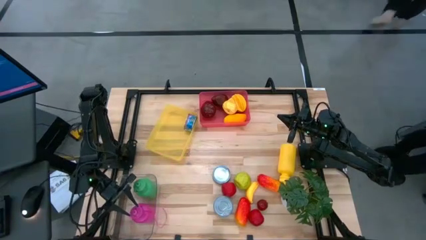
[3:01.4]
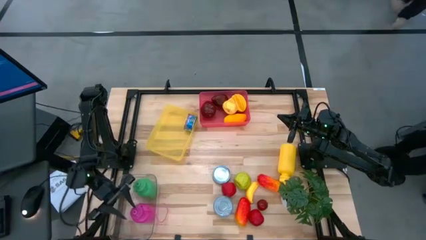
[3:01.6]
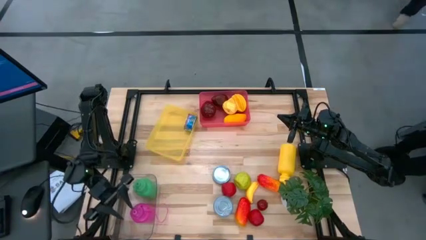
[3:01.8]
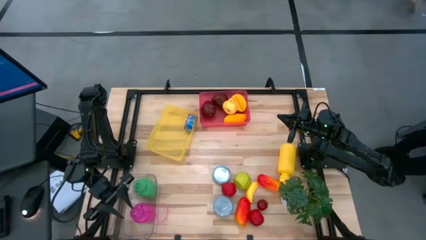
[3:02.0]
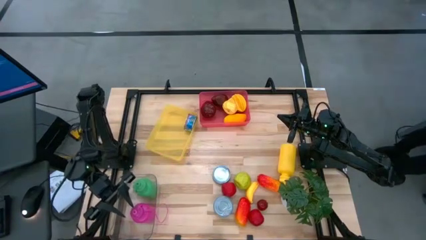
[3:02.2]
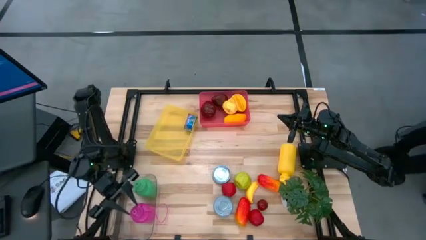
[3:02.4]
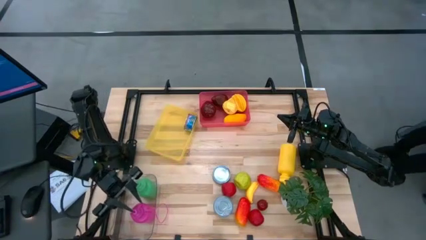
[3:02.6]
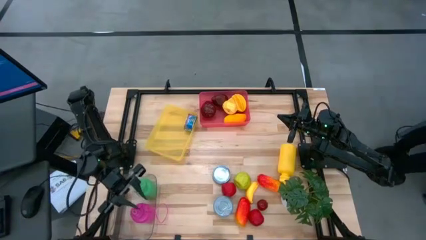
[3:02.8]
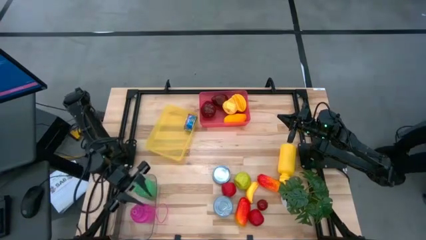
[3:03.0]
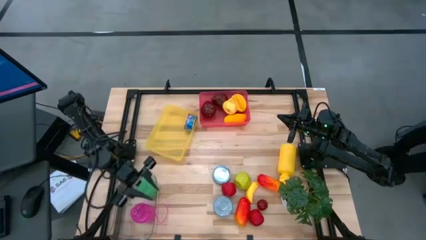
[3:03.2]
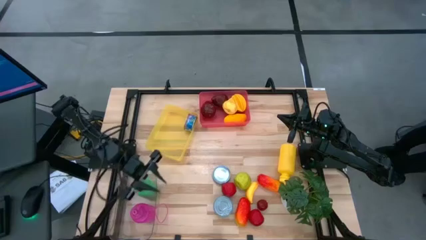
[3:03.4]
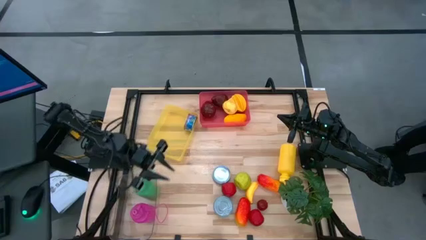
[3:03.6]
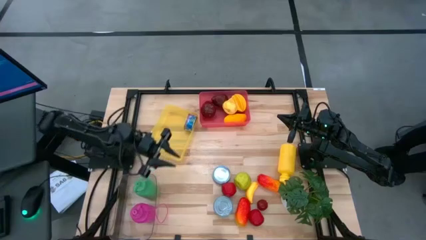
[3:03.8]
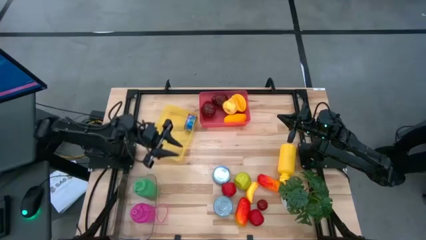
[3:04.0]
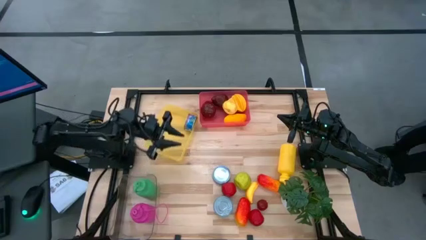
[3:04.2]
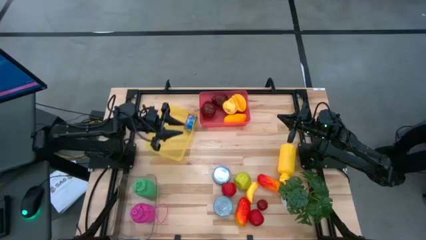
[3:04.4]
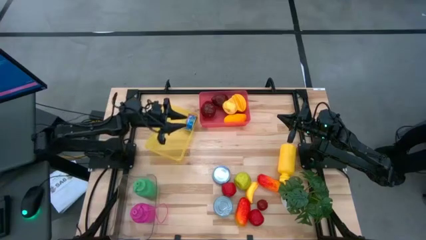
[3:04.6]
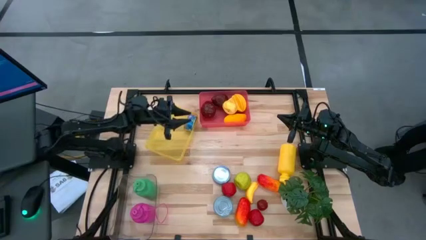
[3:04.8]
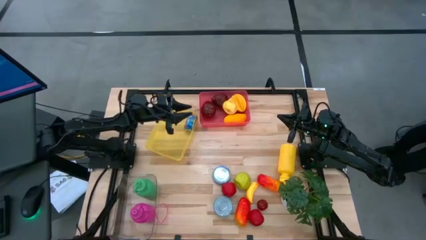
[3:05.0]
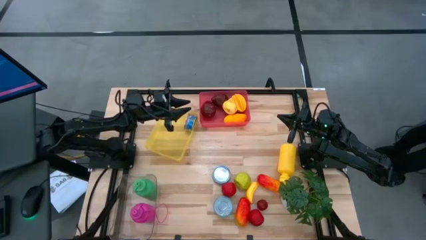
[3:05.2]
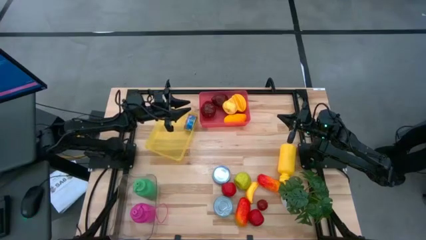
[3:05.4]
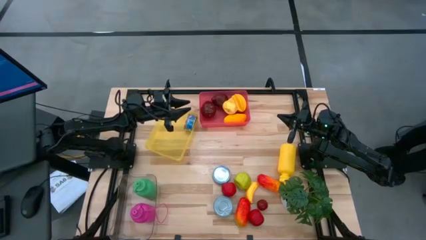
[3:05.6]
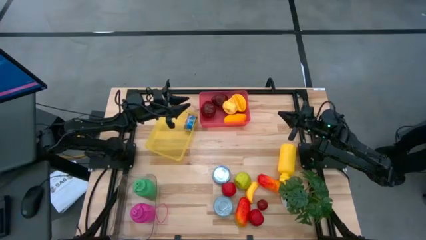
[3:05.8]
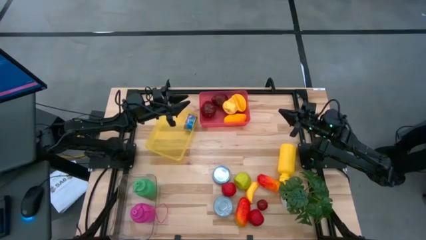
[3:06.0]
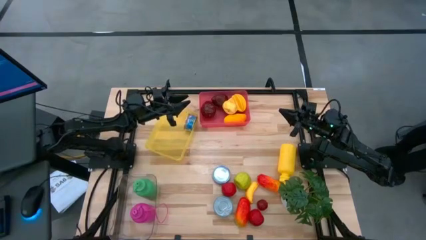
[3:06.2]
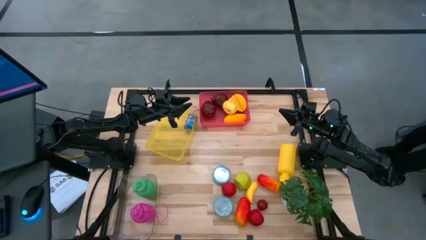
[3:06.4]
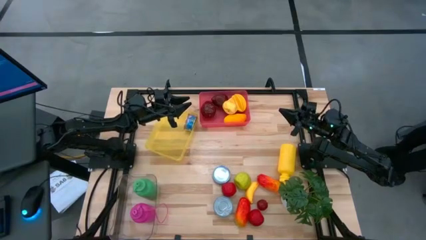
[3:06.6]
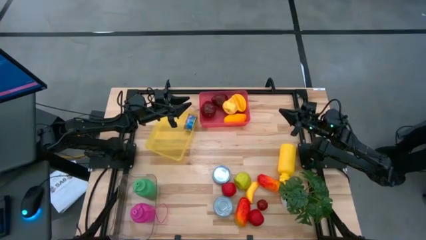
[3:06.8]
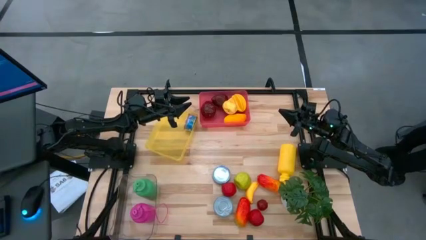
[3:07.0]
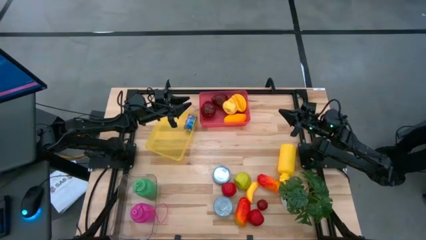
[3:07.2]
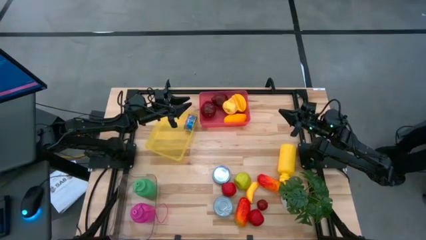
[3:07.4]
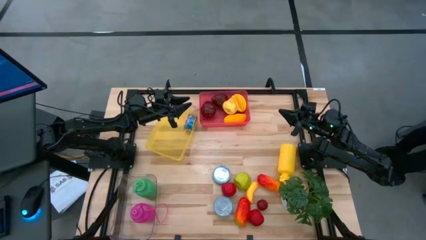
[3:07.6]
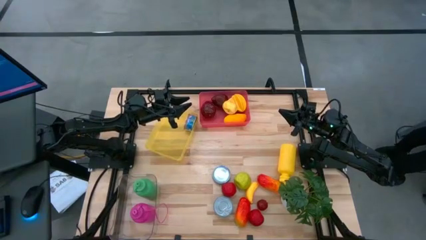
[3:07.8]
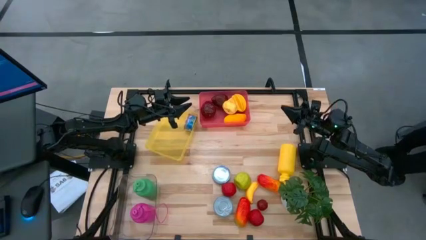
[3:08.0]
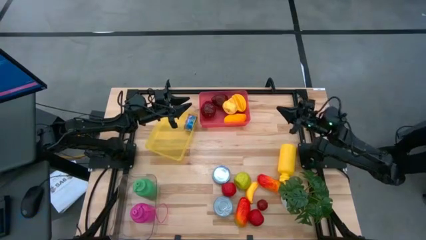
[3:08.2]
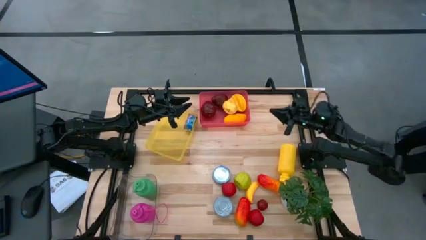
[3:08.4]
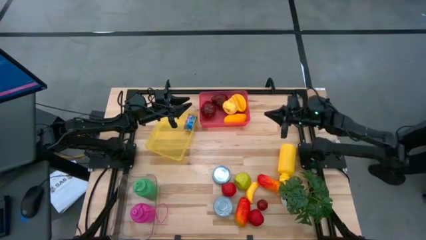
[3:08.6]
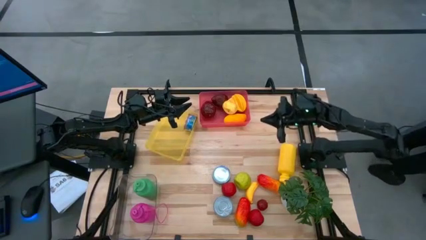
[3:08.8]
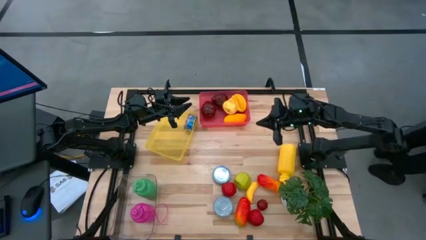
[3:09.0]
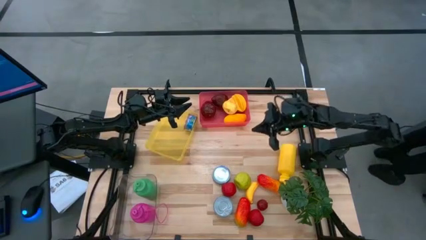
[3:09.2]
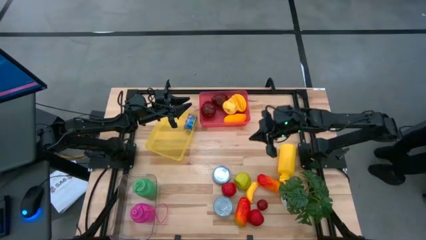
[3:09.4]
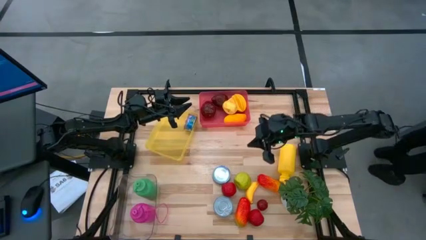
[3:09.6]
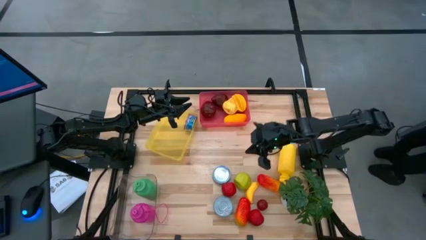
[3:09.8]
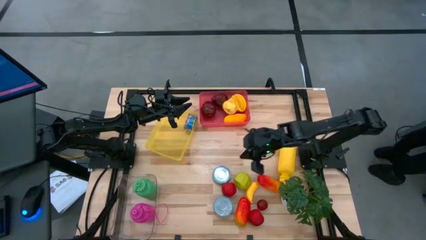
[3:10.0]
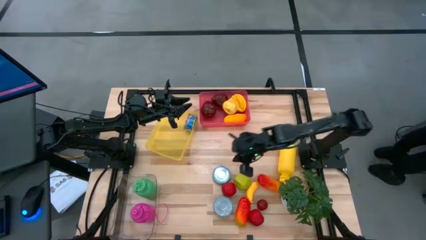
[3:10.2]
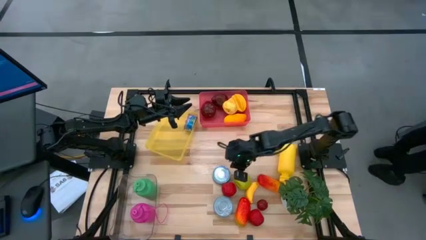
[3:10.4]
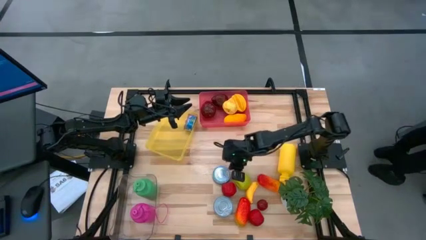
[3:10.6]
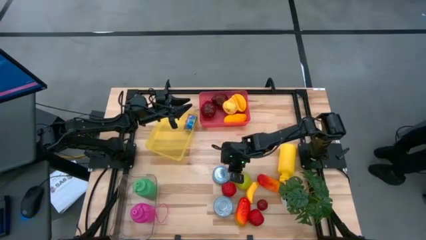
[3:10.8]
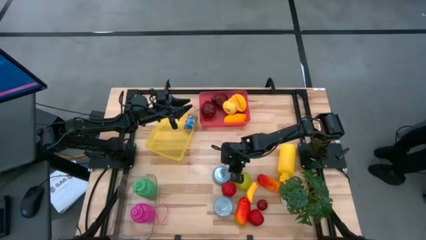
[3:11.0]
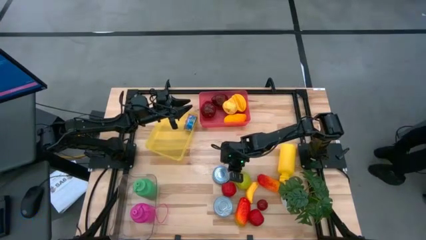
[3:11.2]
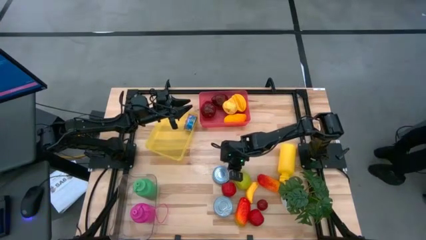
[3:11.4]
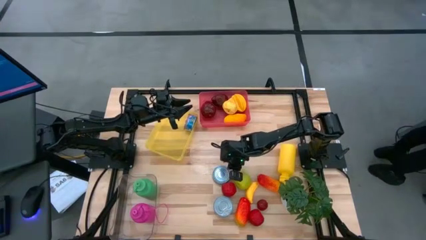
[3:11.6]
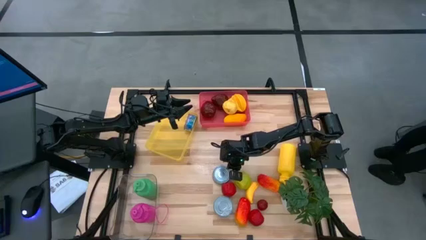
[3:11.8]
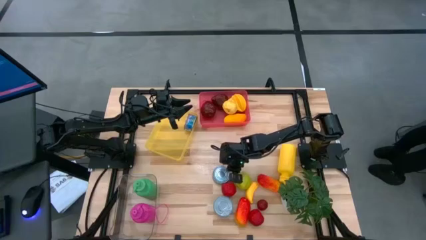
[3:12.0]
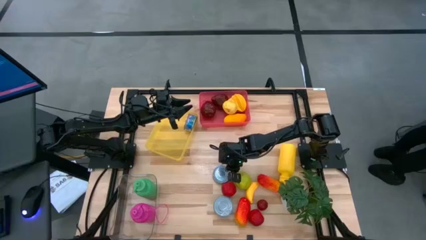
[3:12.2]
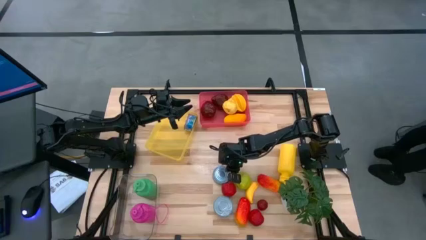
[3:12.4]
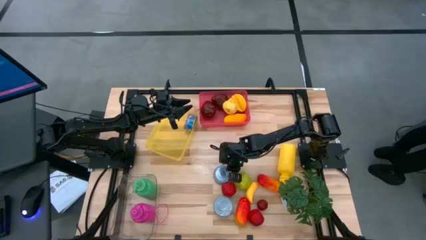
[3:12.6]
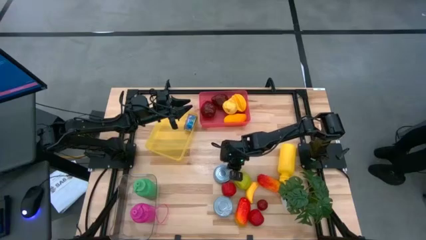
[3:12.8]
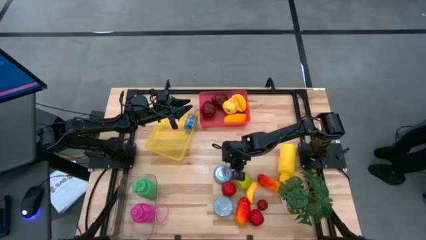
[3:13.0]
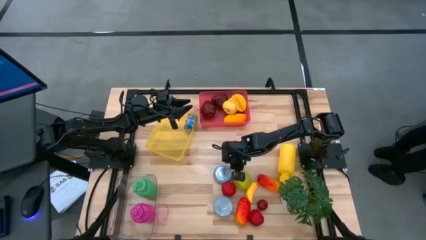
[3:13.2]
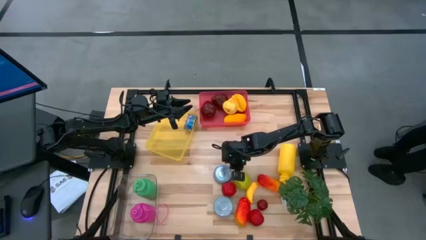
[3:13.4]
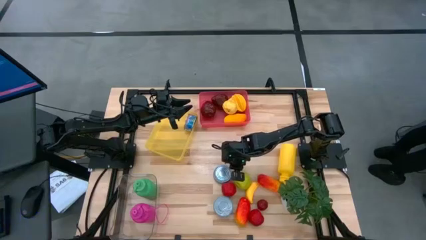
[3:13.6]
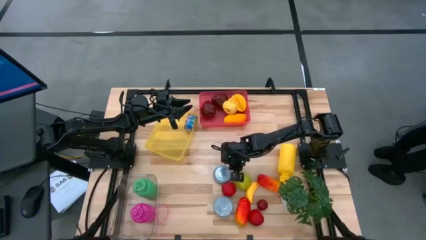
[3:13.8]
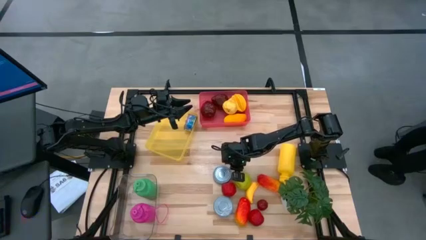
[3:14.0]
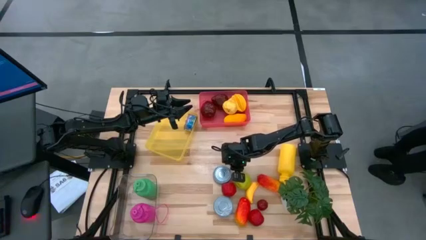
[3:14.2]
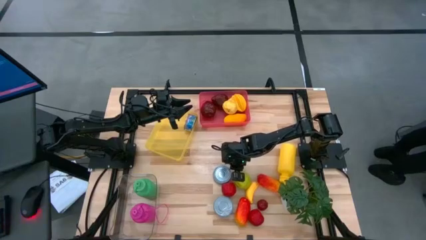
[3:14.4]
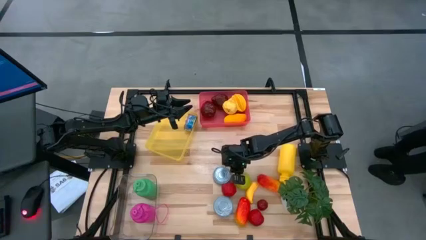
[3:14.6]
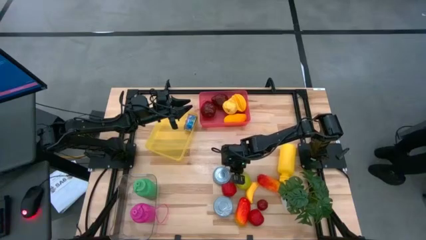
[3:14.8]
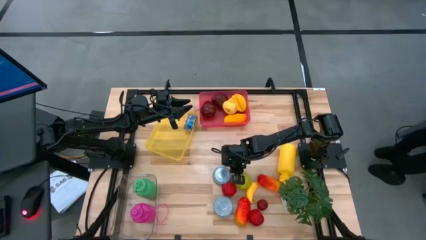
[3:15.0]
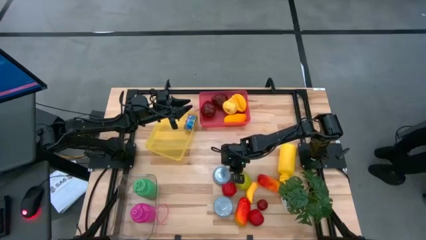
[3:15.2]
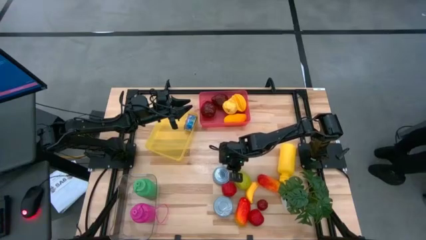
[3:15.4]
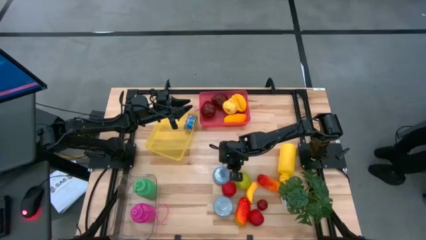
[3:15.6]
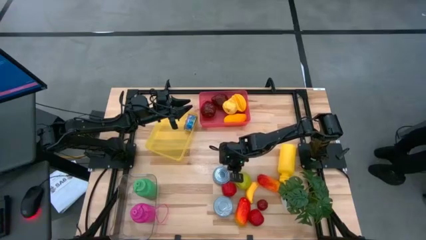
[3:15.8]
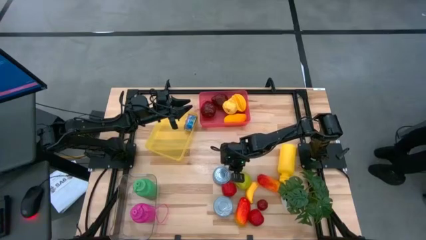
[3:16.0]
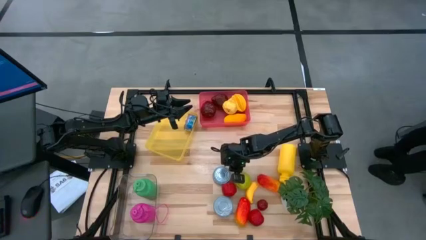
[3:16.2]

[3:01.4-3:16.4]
Task: Pick & Place Food Item
Put the red tuna can into the yellow bin
